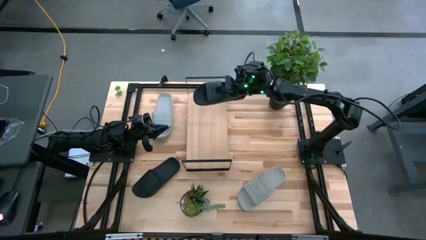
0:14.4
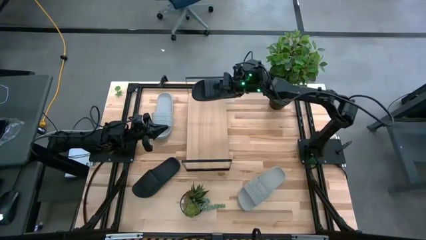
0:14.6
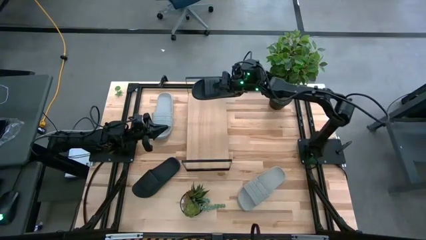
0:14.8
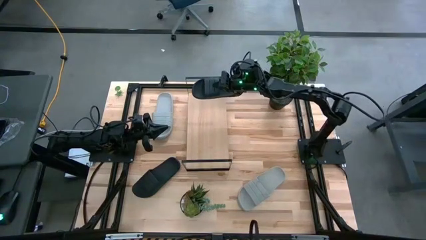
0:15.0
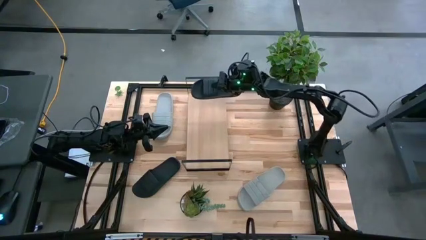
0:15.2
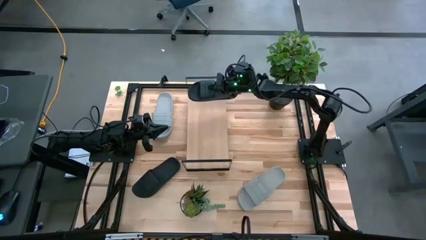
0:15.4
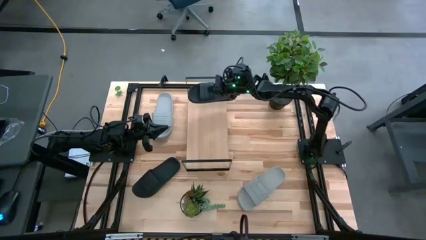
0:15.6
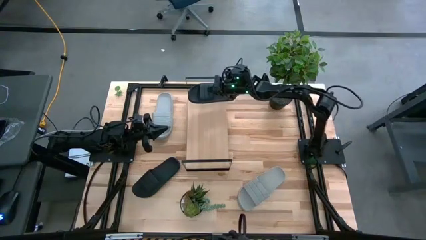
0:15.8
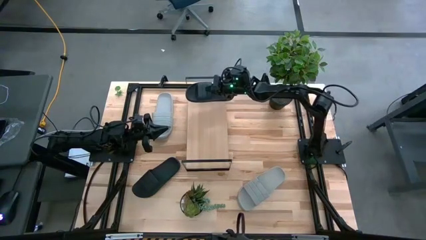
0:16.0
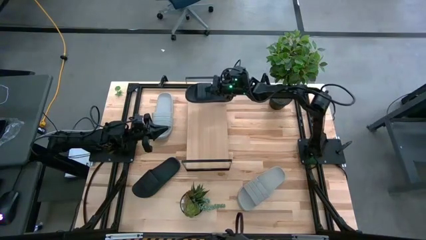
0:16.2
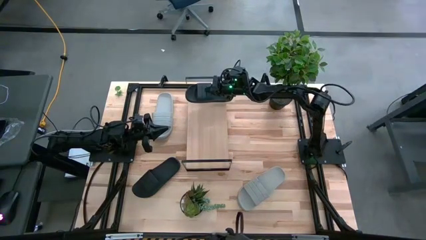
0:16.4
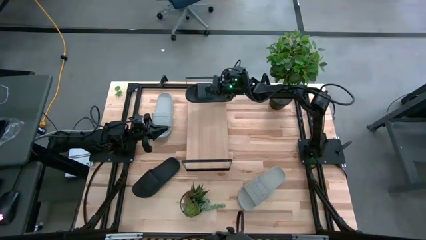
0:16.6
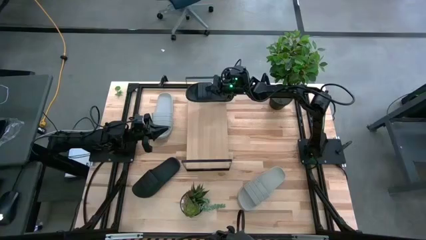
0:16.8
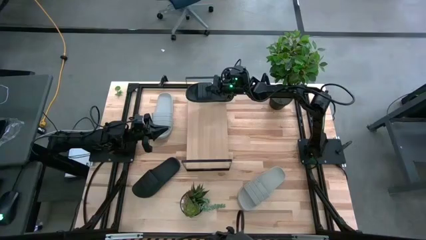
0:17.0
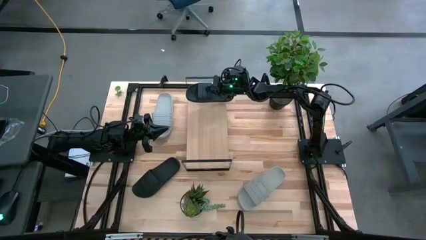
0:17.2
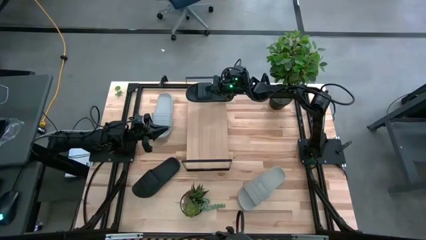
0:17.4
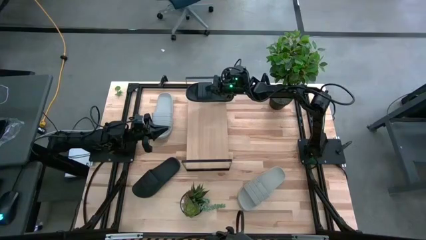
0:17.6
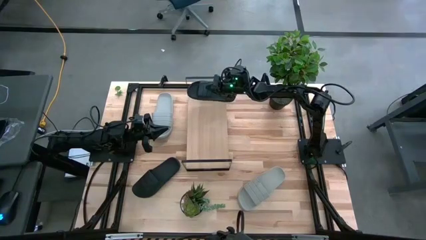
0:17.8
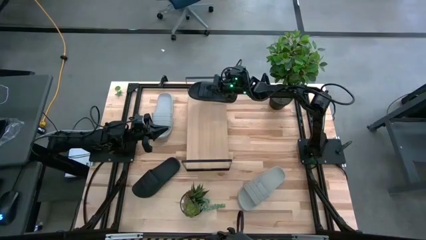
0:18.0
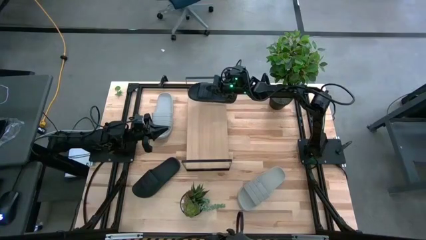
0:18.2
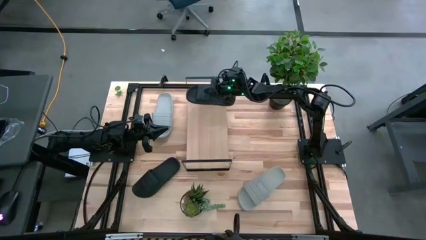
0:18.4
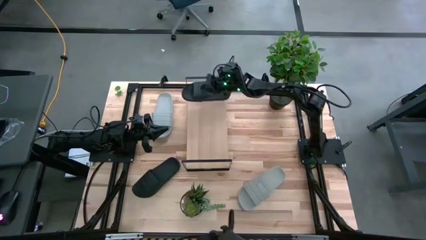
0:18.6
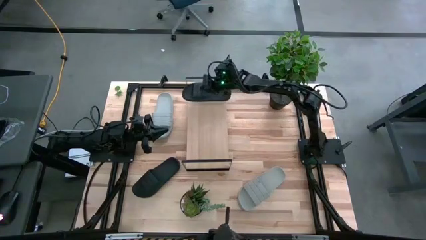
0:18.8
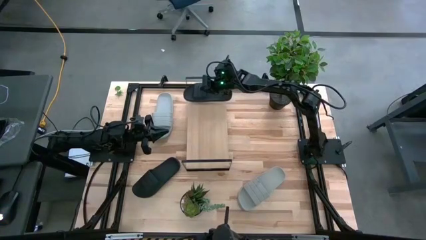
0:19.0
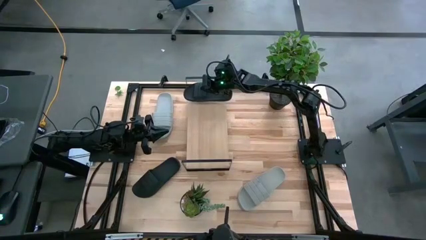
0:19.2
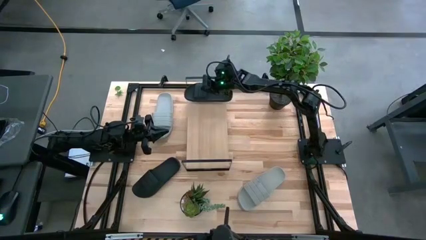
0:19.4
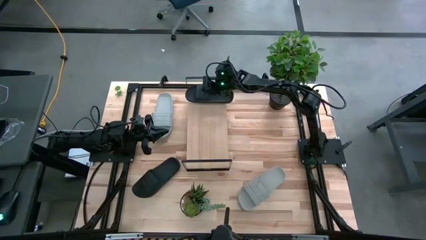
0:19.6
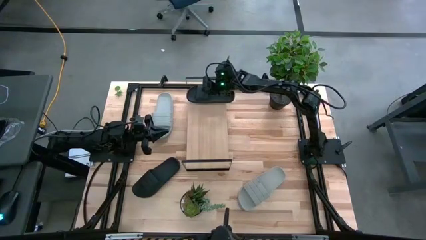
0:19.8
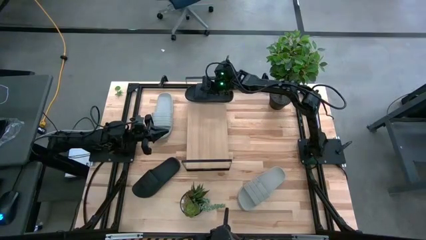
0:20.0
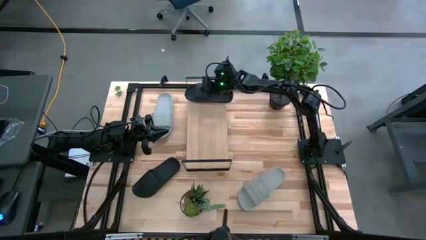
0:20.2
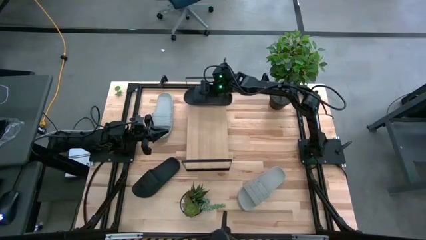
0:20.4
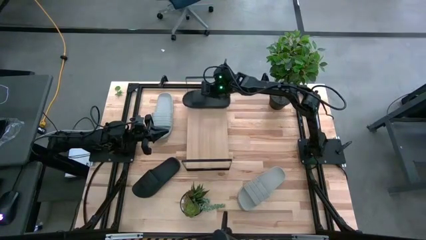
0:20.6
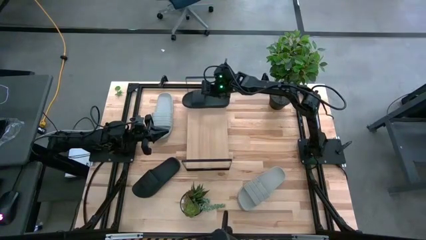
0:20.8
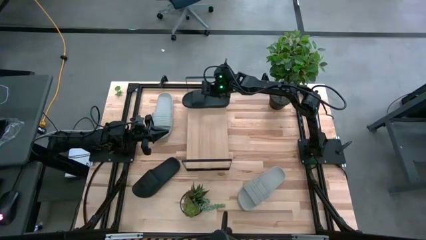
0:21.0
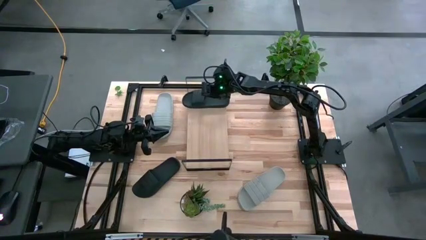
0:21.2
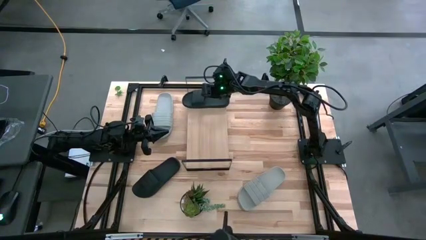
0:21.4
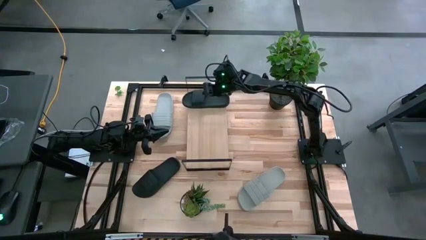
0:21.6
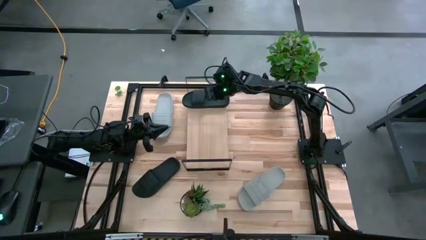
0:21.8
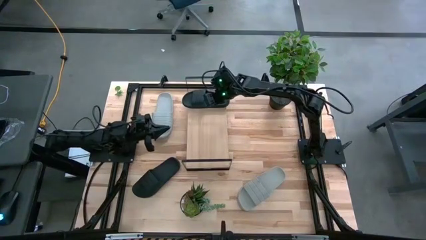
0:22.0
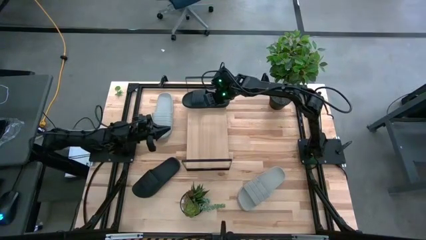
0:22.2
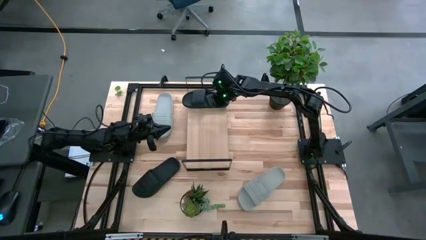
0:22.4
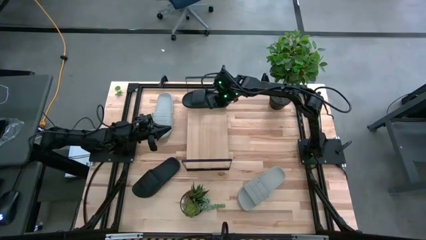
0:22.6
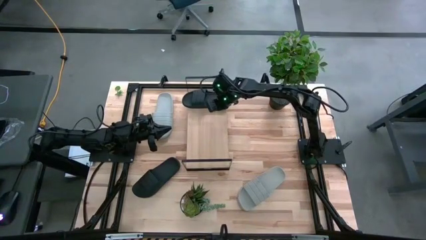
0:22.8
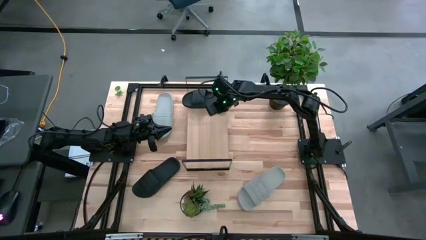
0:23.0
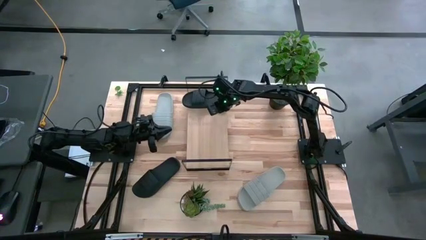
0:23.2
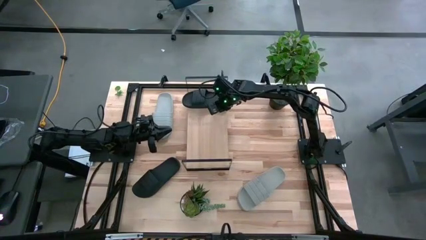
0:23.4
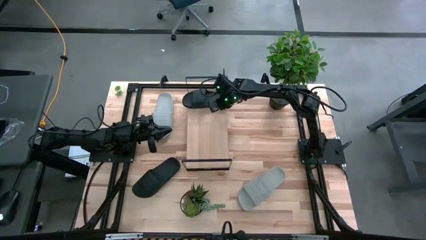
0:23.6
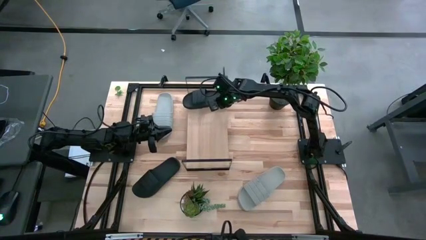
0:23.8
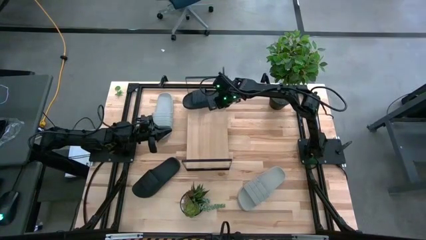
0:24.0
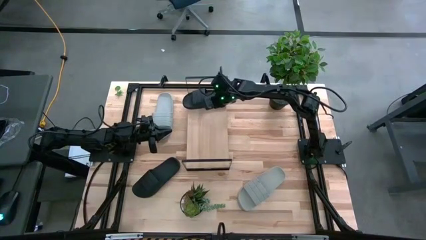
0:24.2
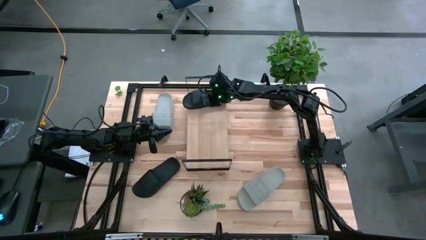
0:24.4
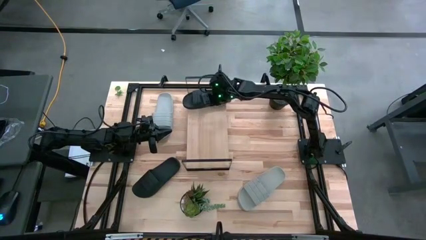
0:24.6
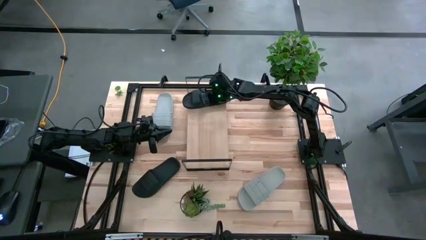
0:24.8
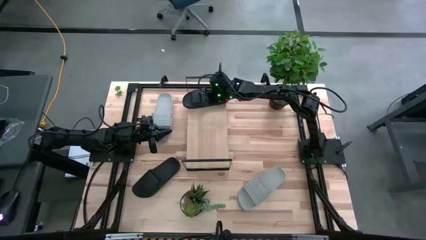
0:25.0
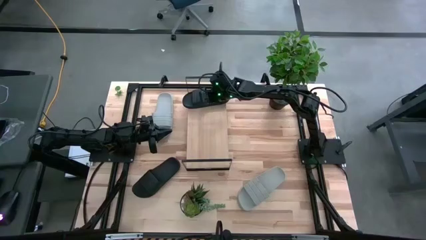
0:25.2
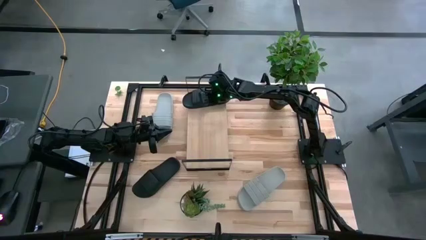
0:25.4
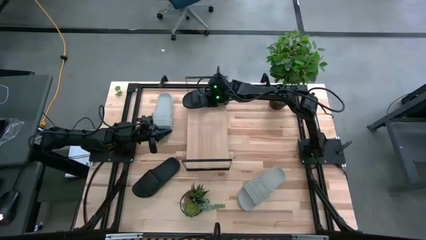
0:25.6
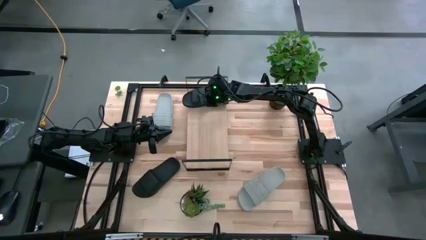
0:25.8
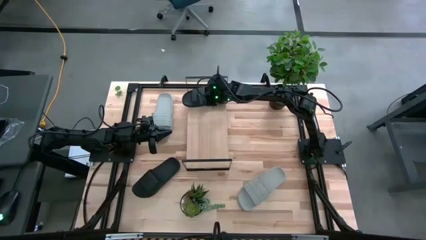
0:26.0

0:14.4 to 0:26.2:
Task: Pick and place slides into the shelf
Put the right black slipper slide on the shelf
